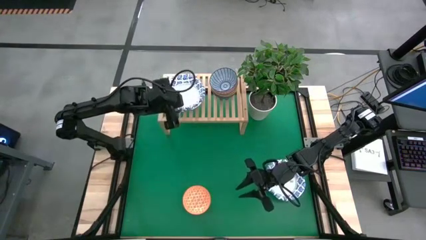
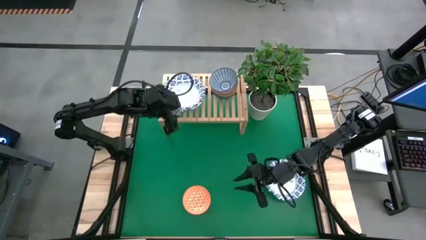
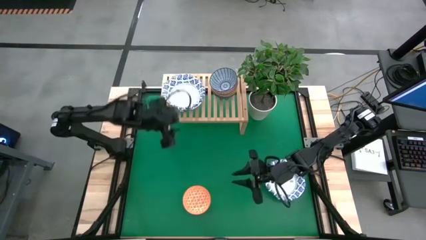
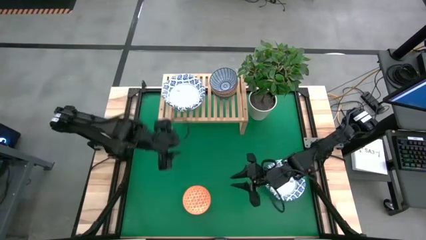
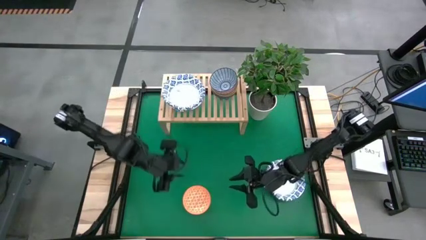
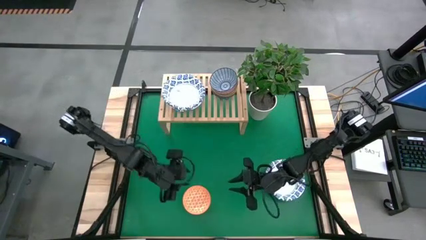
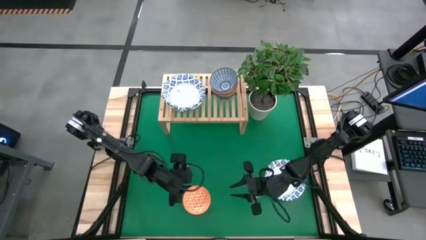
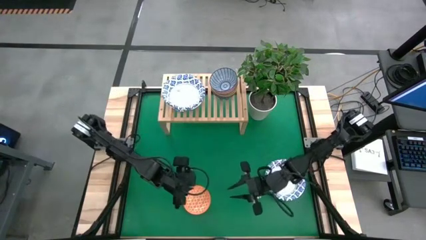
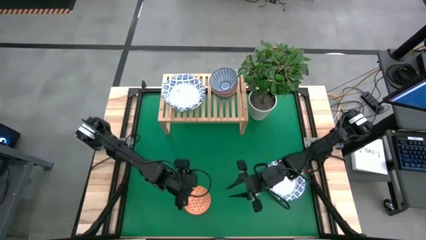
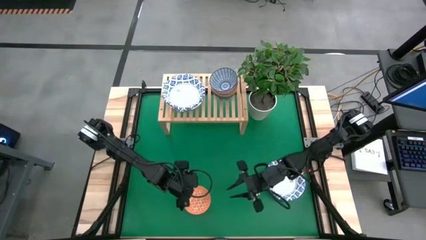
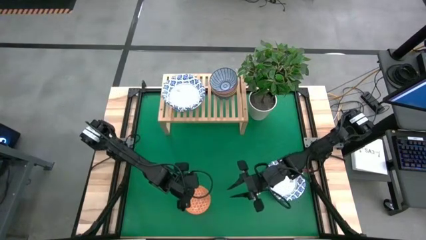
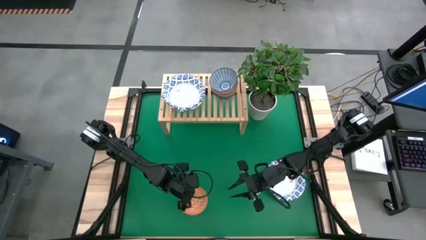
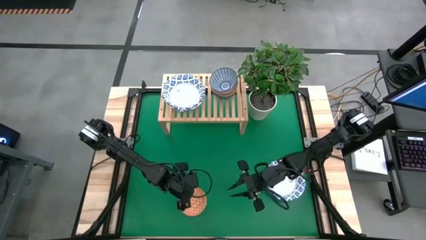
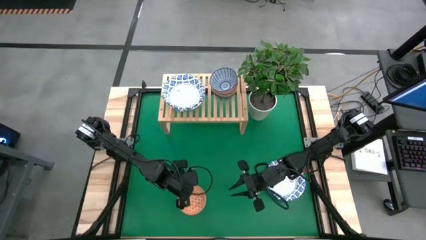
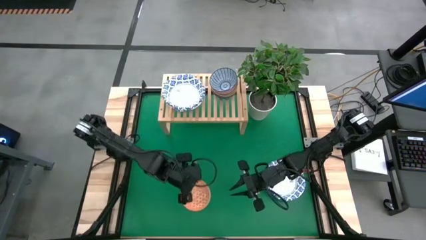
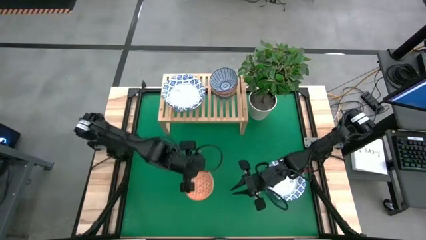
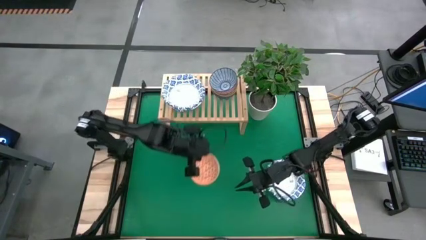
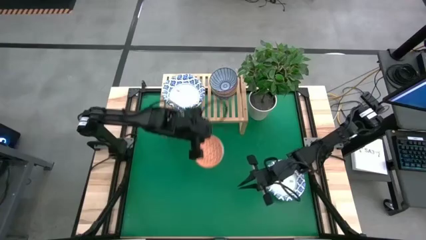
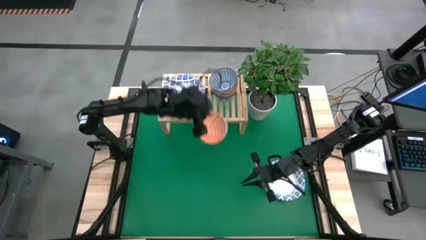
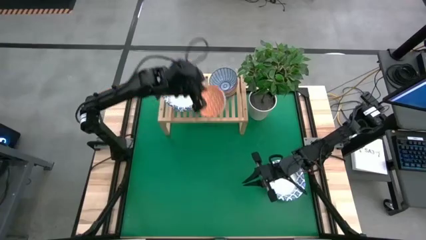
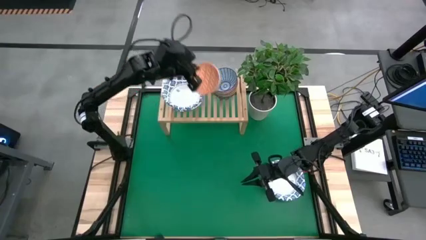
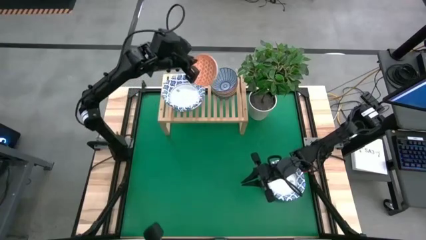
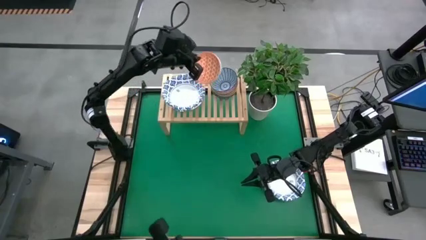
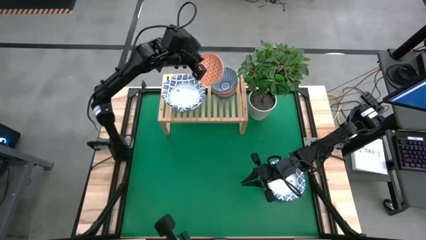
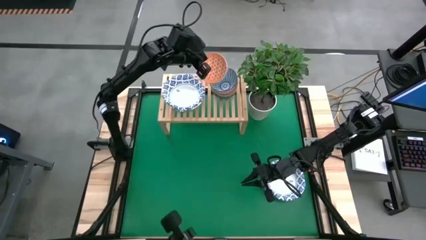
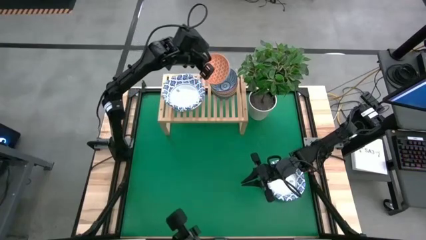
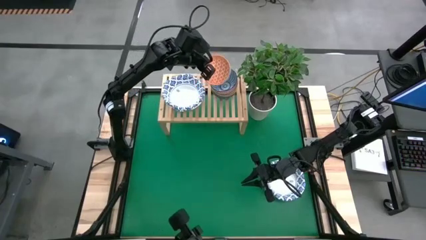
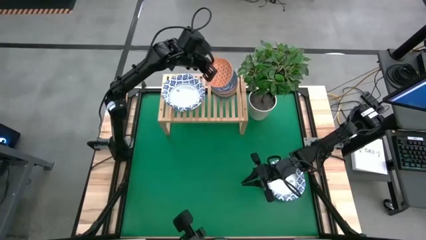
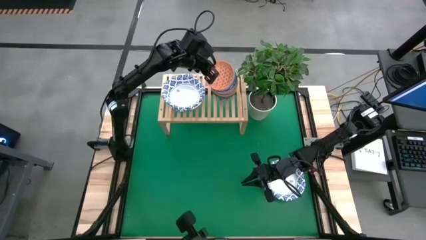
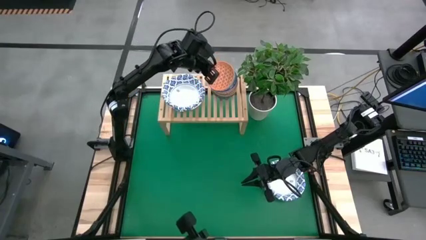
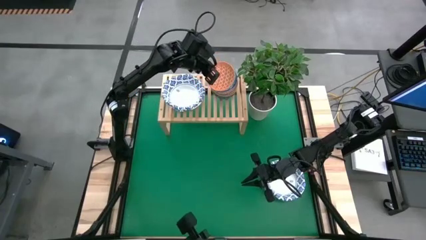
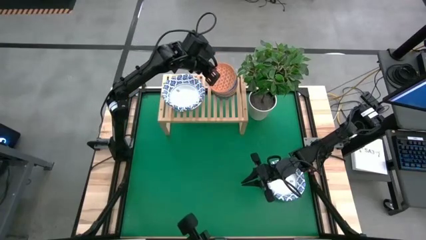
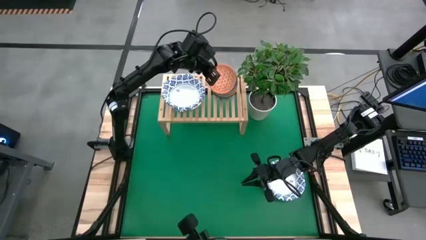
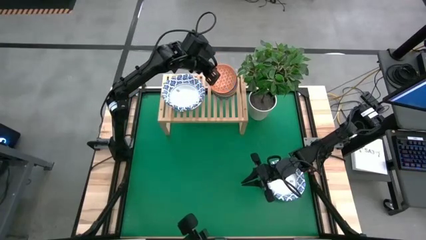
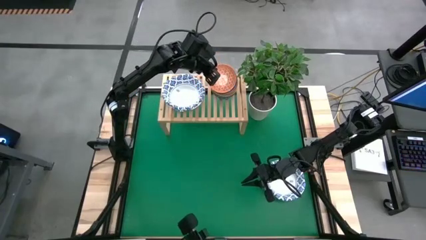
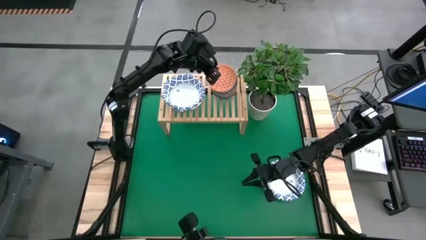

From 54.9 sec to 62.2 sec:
Task: Place and stack bowls onto a shelf
Stack the small orange bowl on the small blue bowl on the shelf

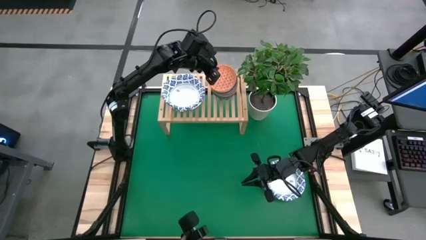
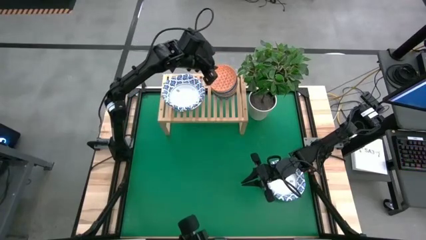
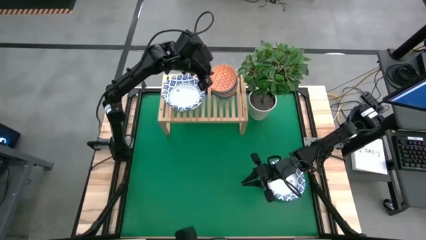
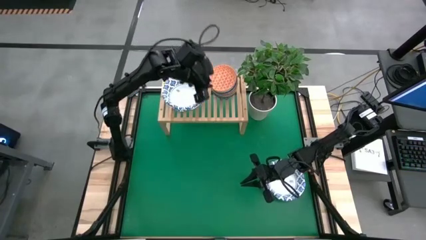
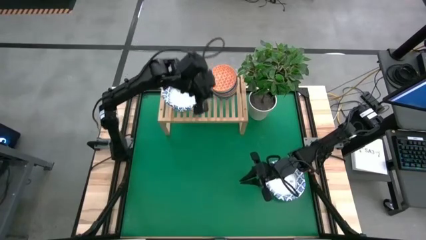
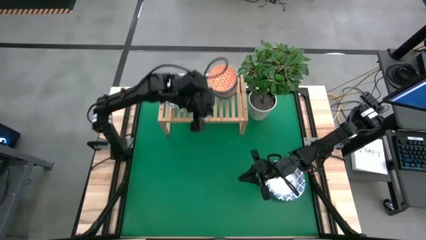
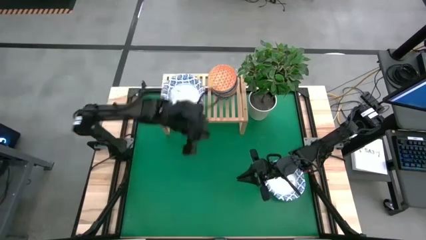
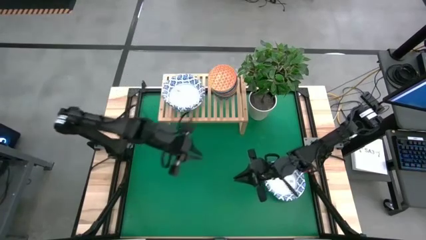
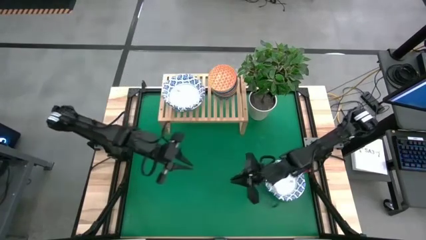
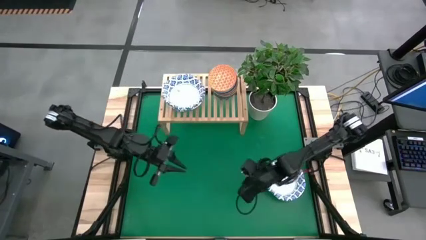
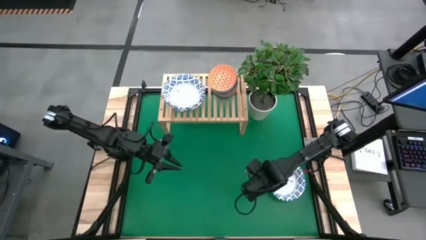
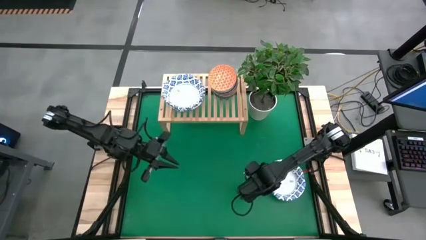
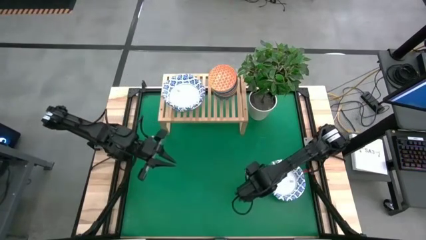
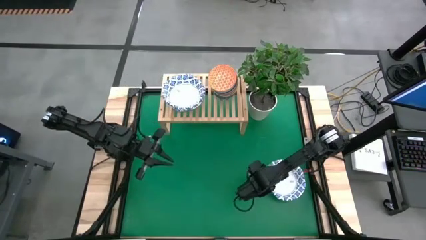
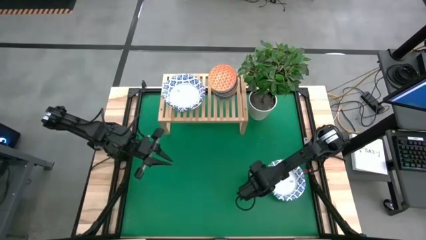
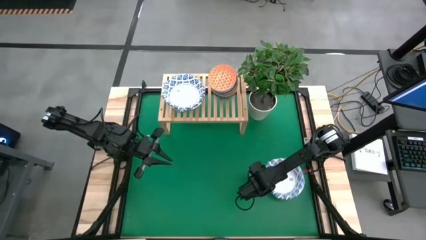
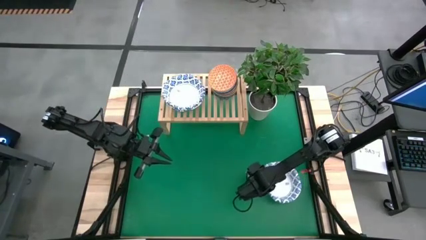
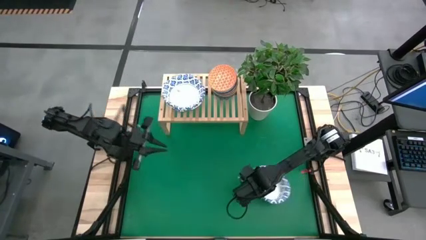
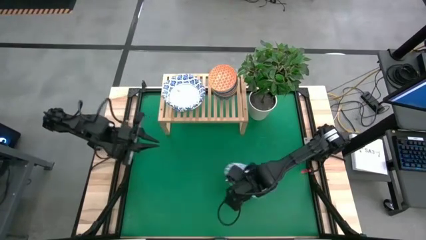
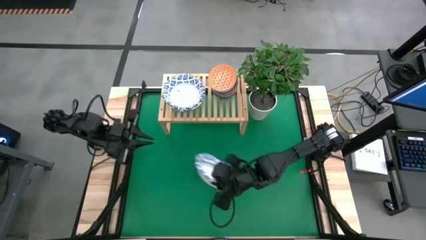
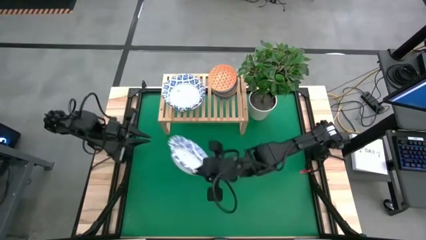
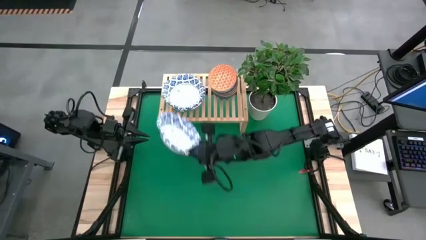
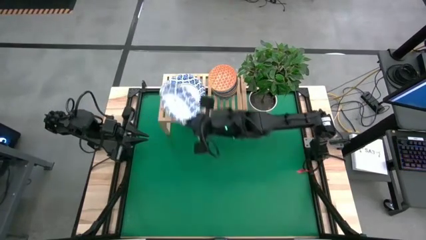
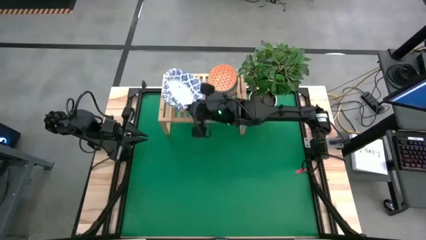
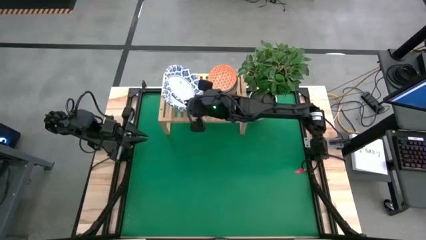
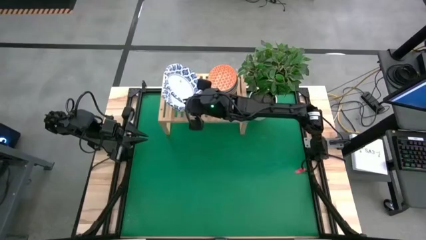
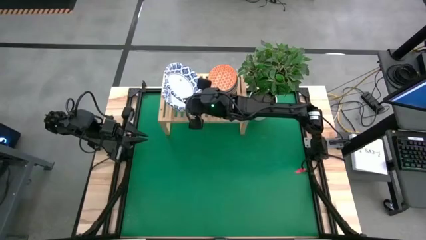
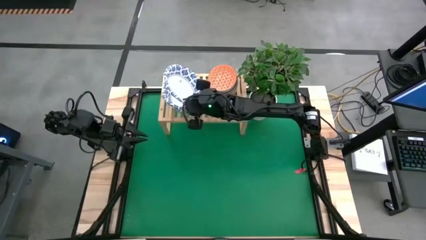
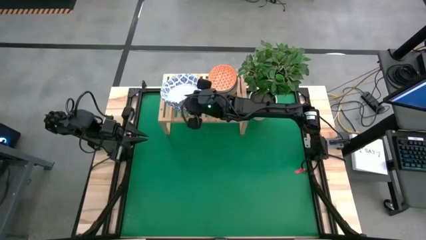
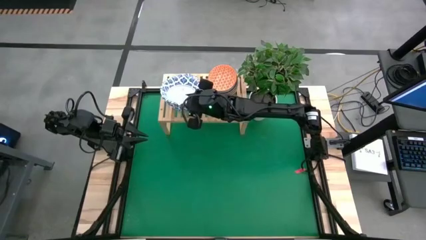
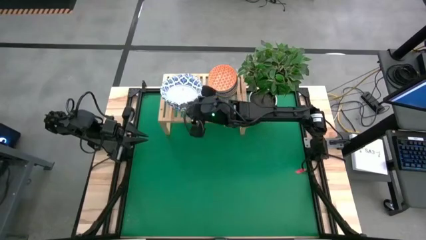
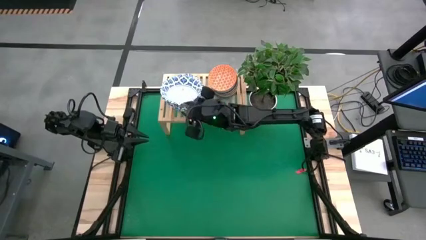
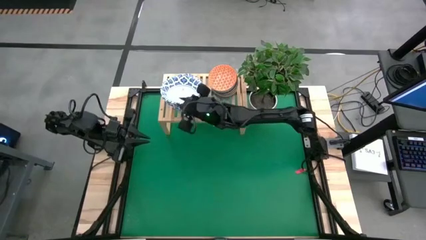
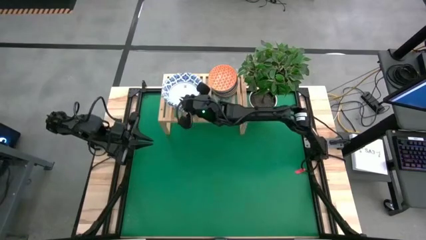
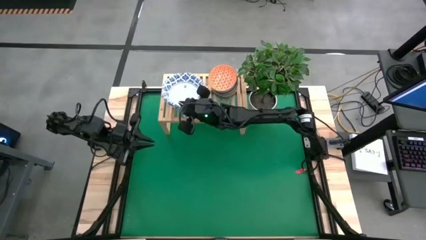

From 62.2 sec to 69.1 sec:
Stack the big white bowl on the big white bowl on the shelf

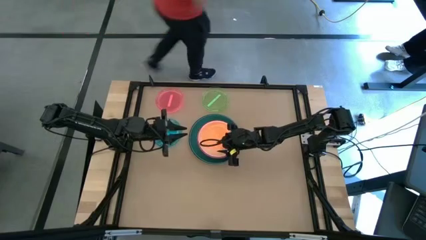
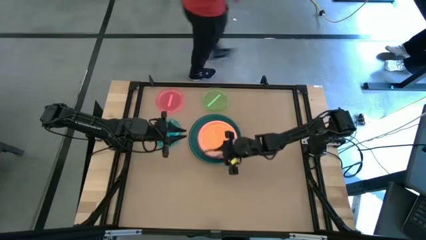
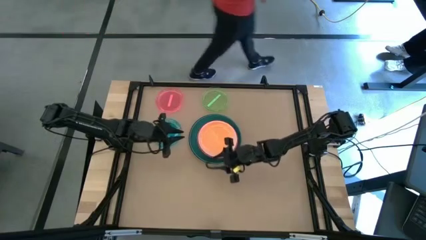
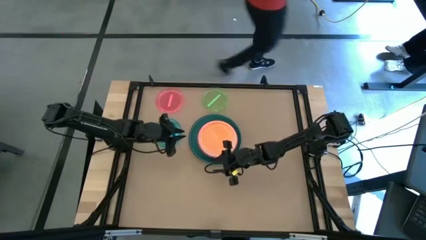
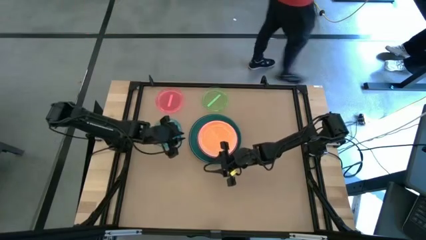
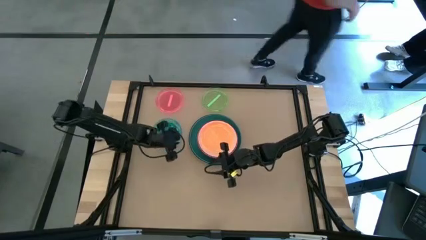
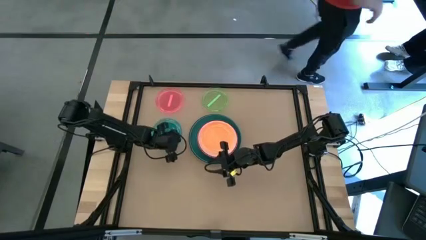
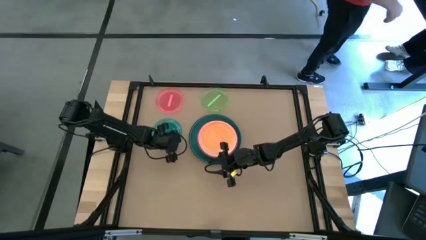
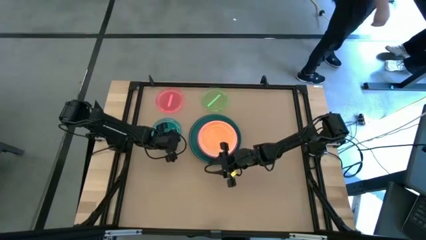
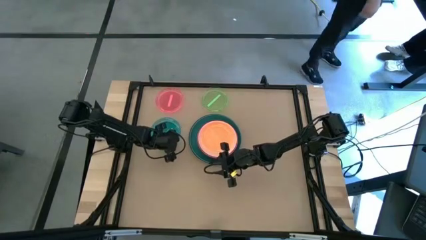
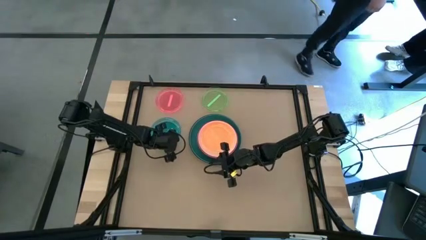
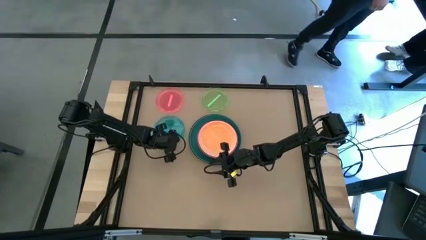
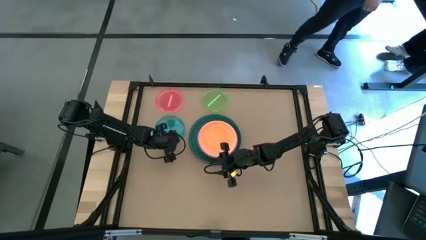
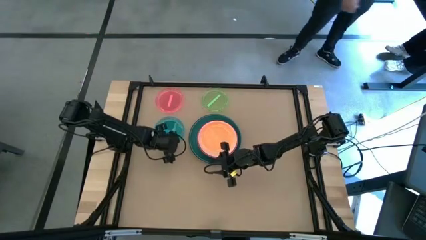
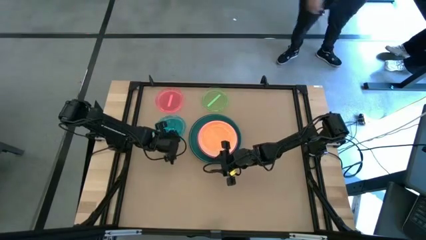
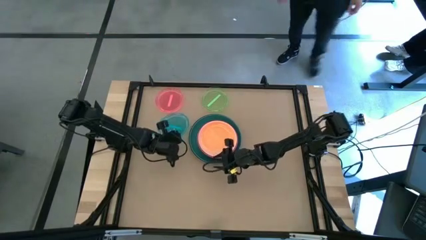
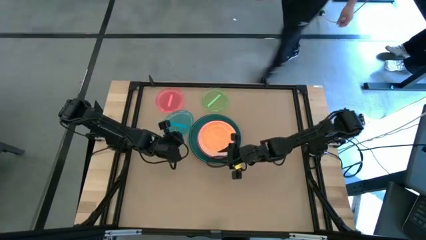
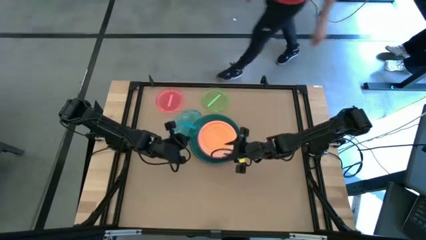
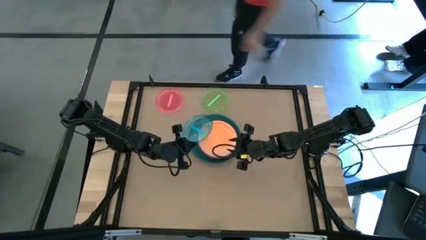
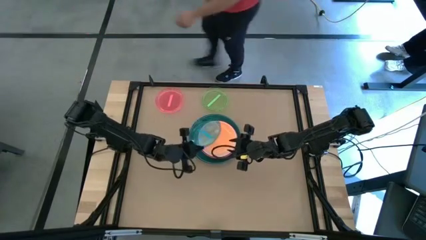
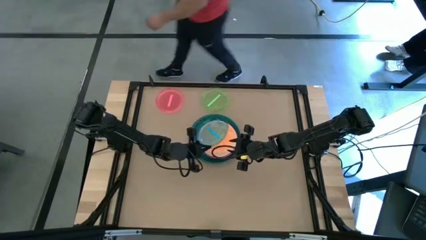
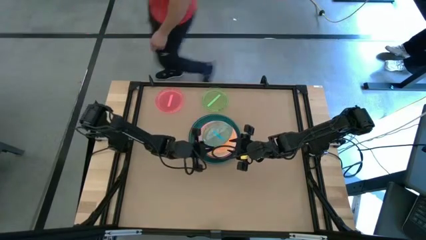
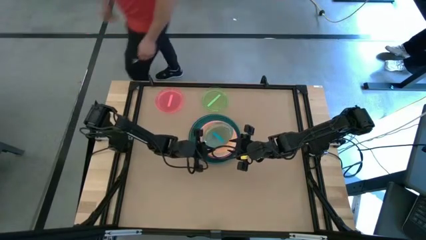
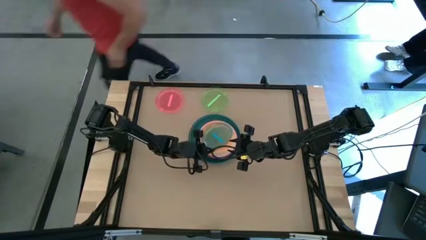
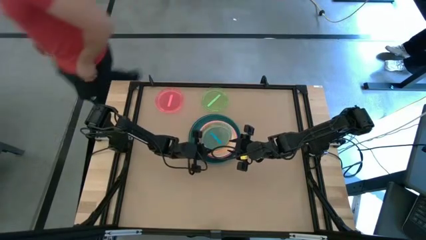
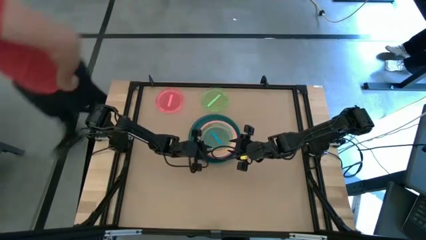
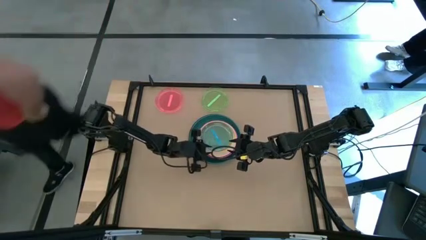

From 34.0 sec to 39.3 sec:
Task: Stack plastic plates
Stack the transparent blue plate on top of the transparent orange plate
